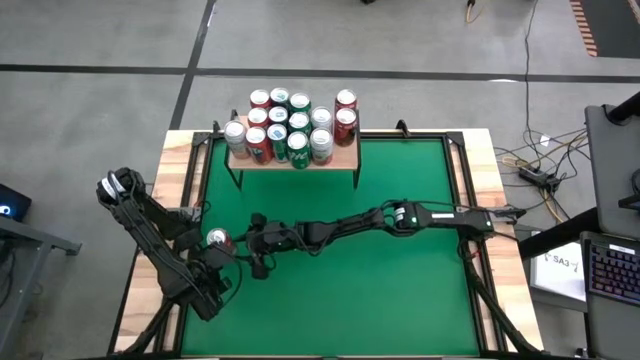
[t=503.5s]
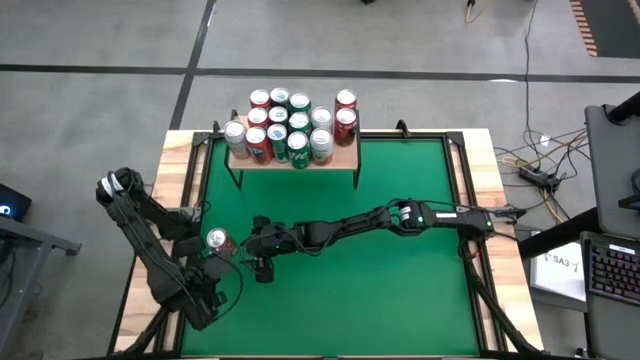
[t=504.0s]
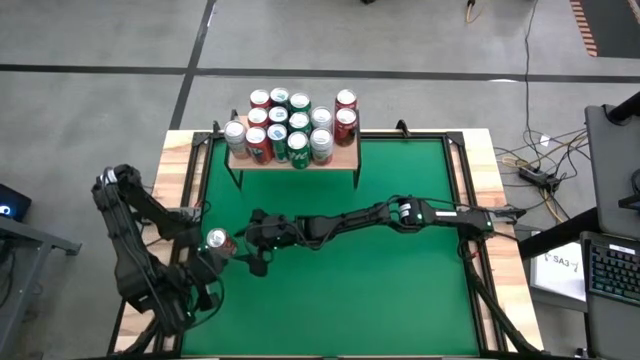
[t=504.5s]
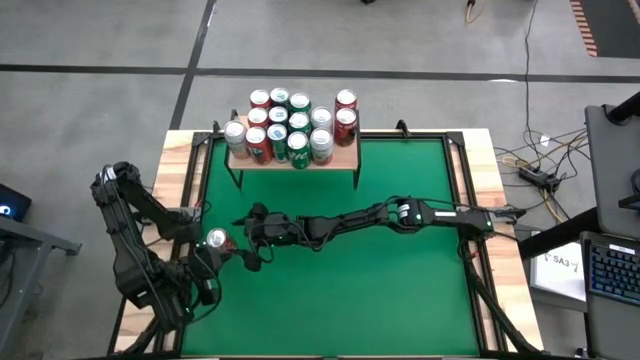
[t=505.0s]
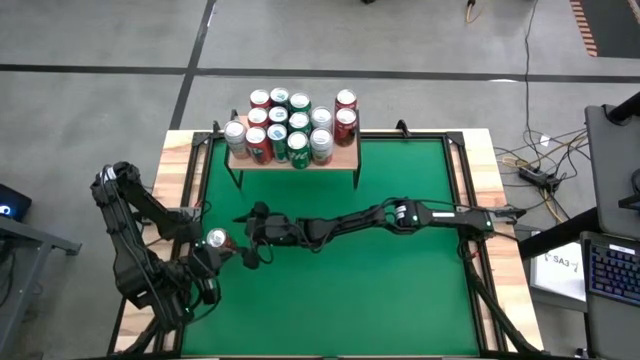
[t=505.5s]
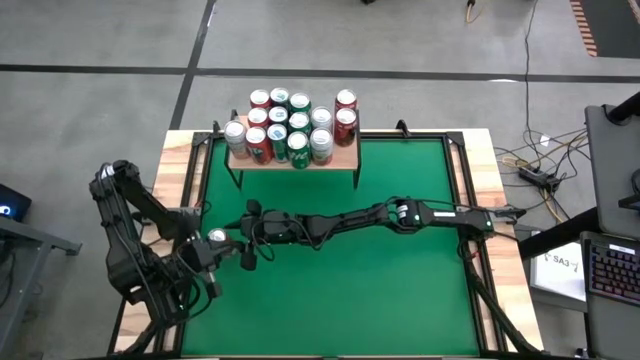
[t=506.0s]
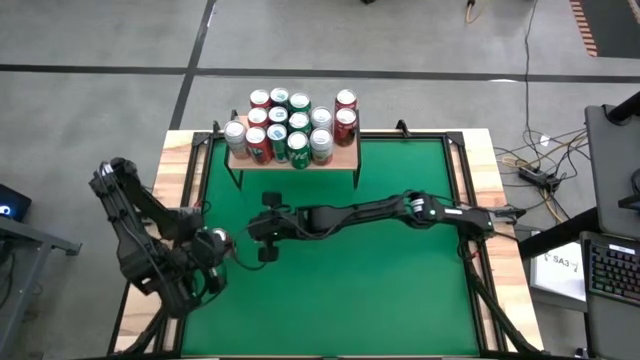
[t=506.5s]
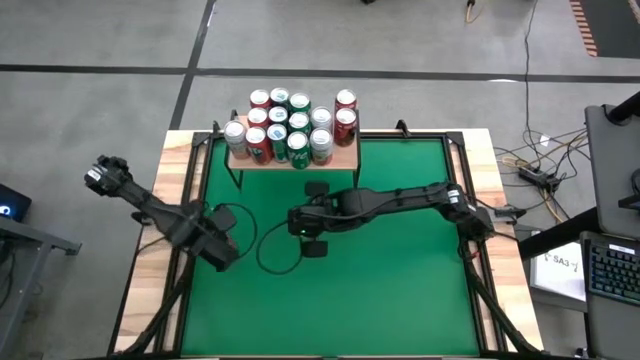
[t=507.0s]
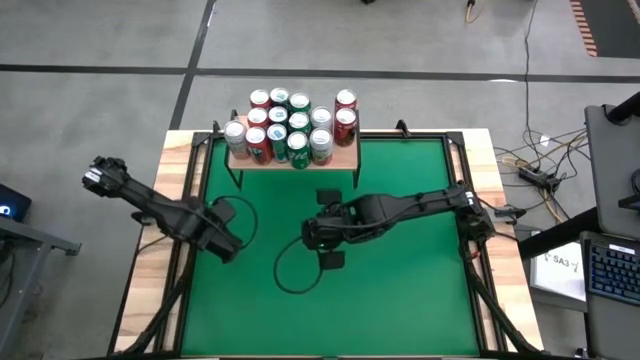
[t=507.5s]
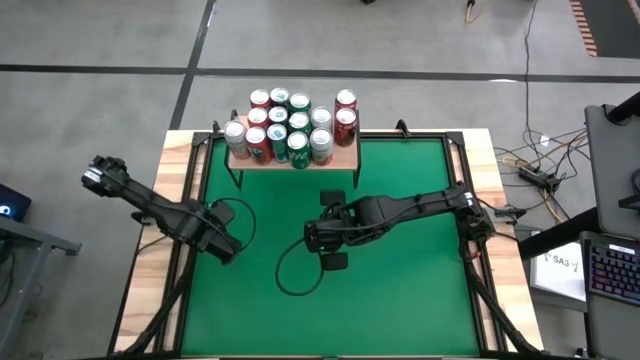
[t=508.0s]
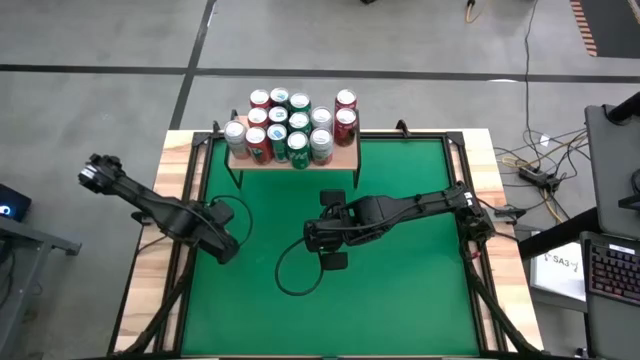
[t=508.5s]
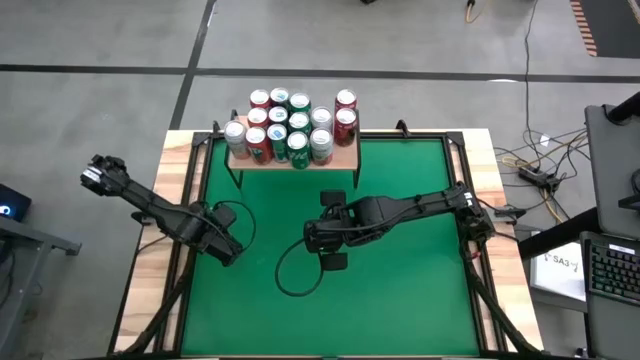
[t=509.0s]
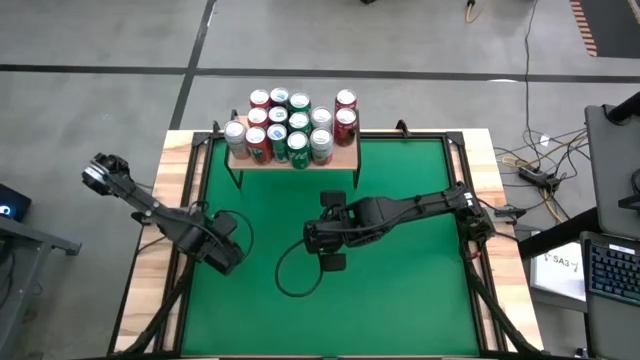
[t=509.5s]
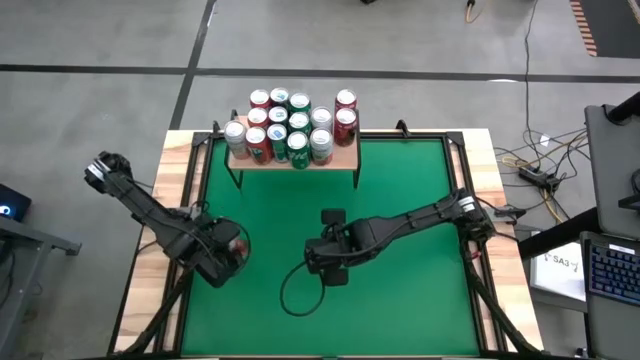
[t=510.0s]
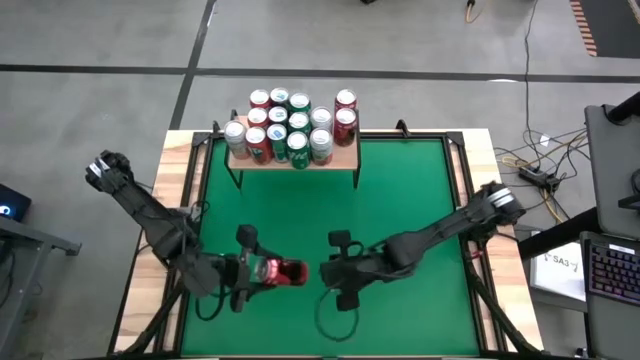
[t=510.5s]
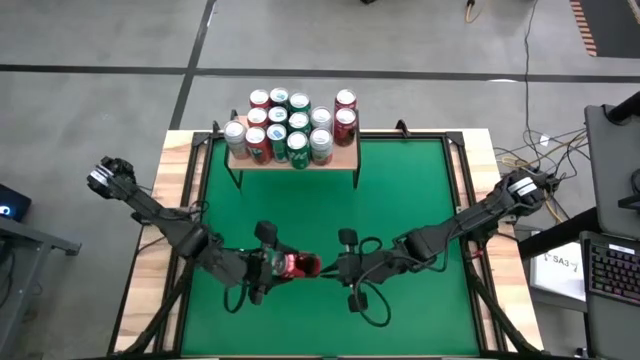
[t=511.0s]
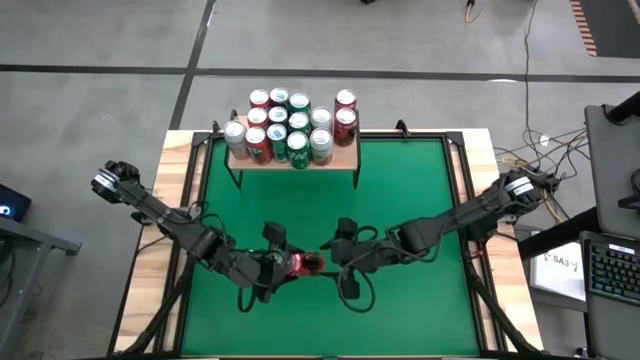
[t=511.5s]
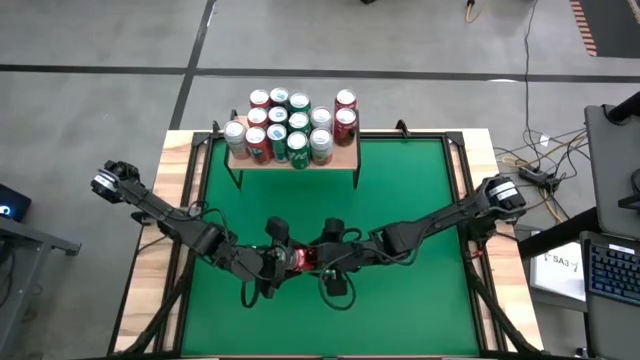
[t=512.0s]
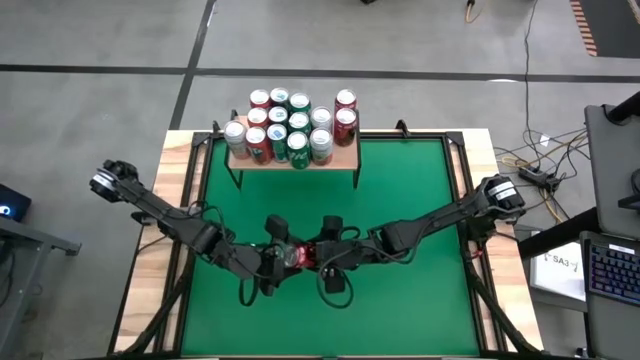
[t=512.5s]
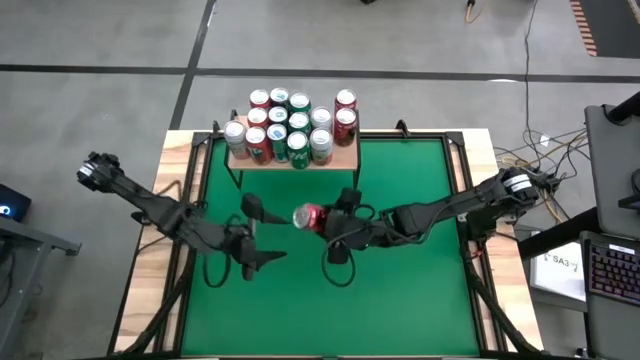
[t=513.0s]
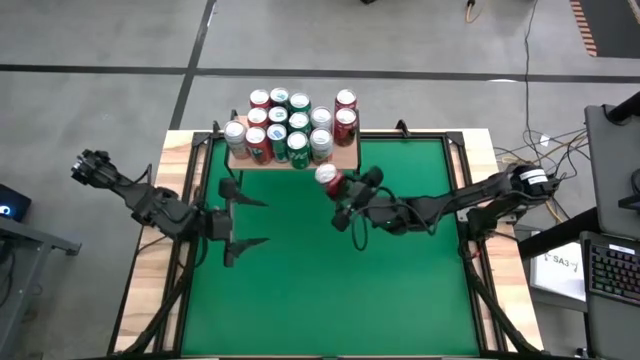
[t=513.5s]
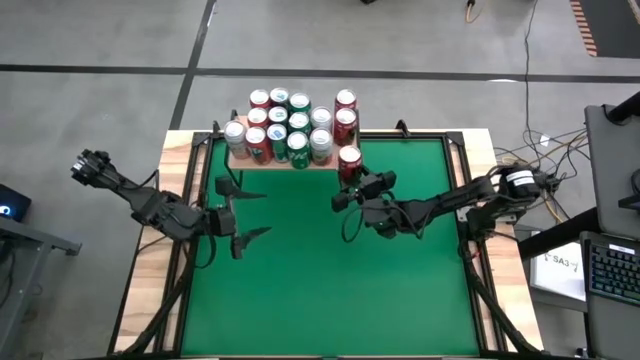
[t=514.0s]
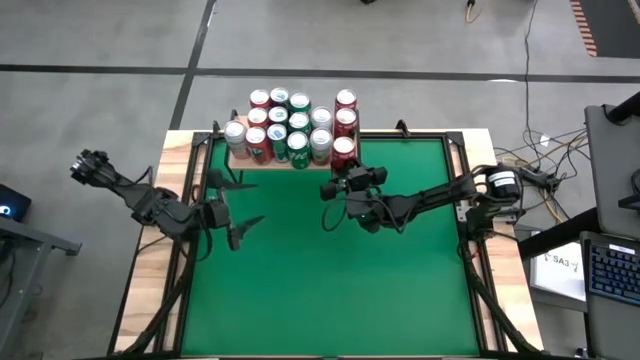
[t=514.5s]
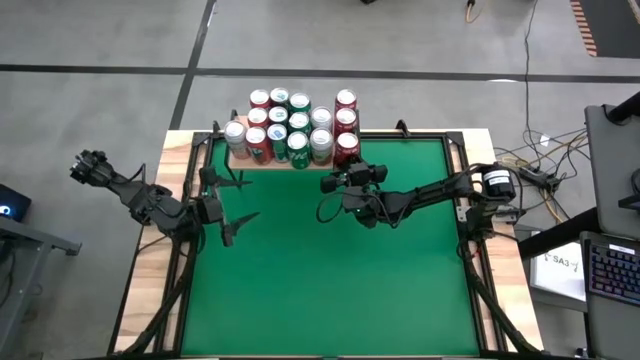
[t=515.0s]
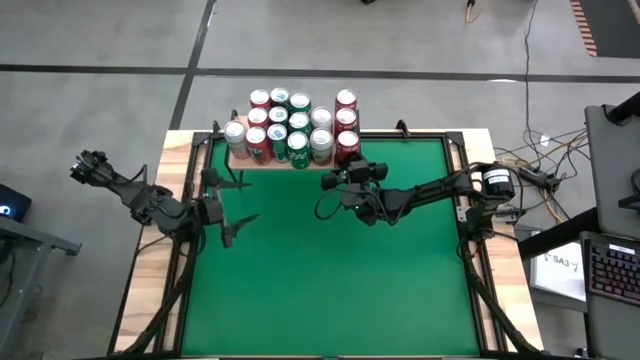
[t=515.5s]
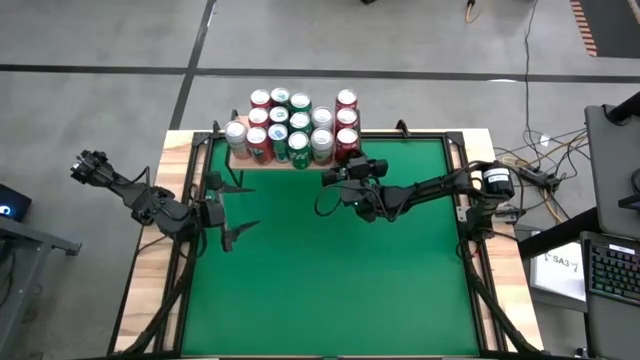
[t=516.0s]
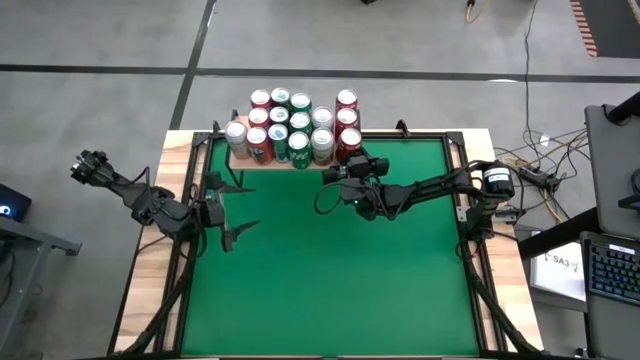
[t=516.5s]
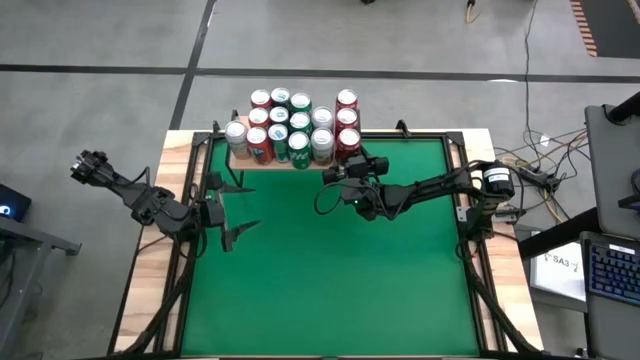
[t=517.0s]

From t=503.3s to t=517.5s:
Task: Place canned beverage on shelf
Put the red can on the shelf

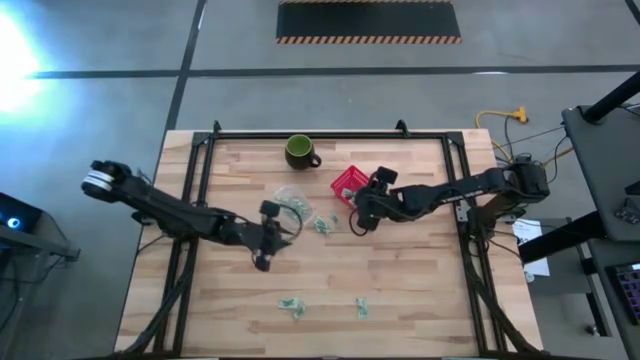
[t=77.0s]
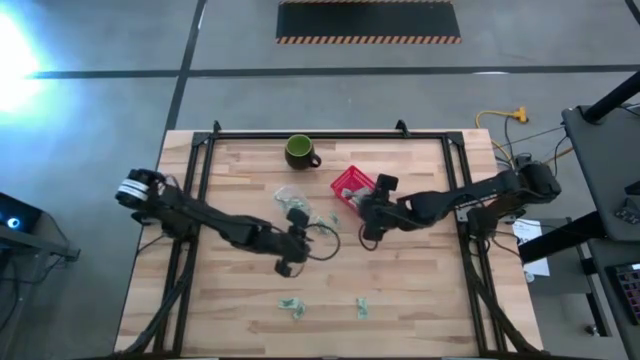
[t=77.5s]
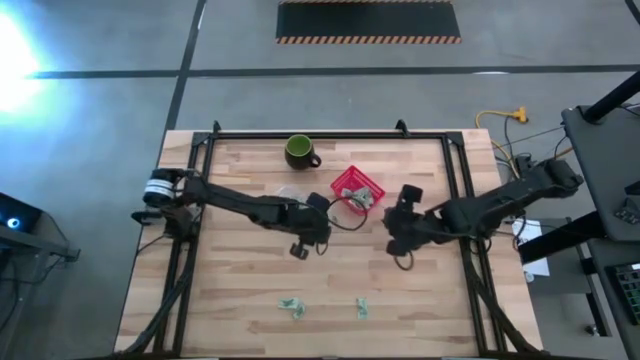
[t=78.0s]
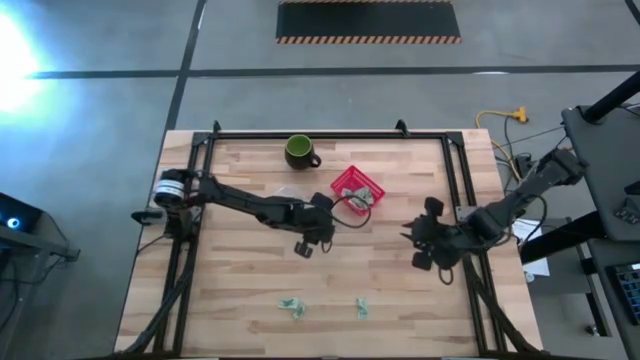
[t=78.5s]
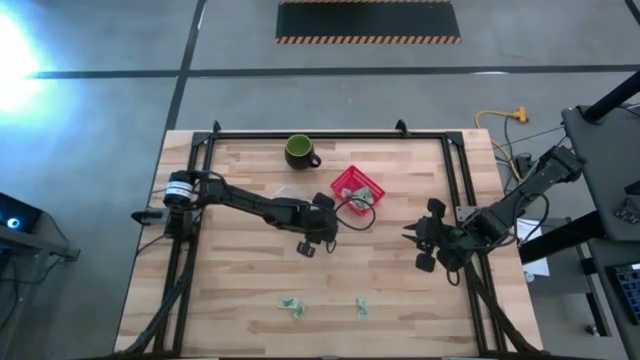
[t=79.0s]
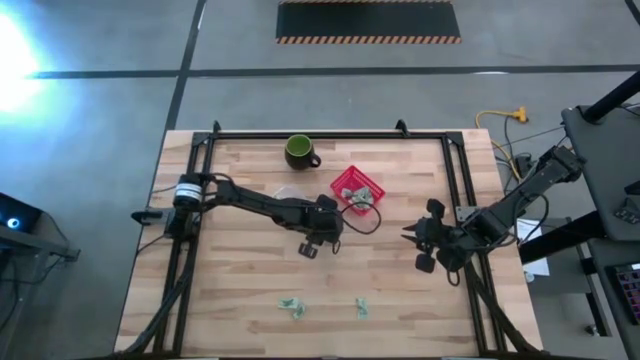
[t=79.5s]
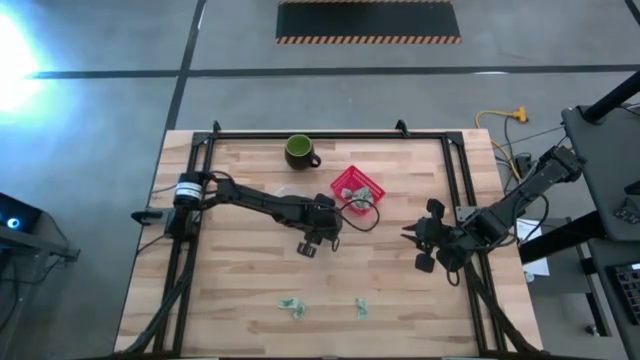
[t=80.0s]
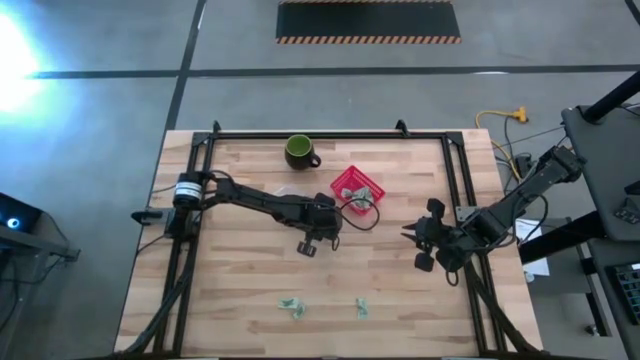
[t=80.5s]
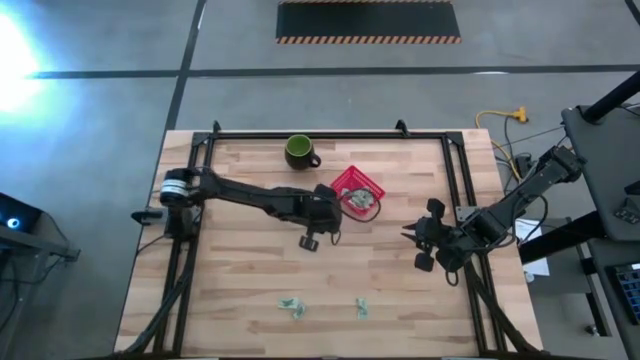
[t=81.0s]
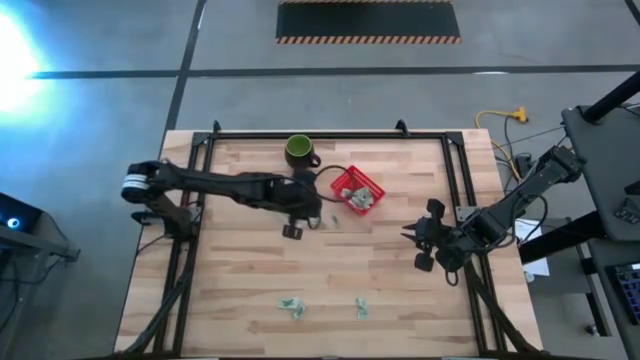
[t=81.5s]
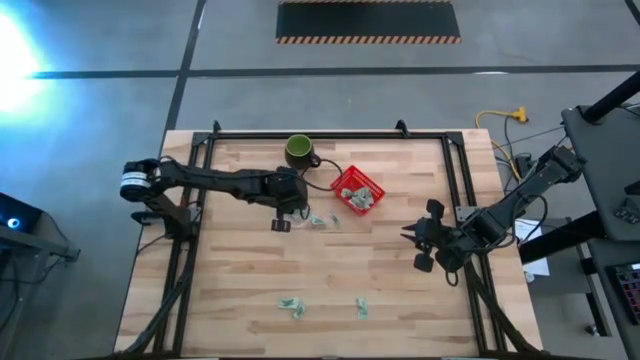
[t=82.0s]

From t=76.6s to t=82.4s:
Task: Pick and place items into bin
Put the stevia packet into the transparent bin
